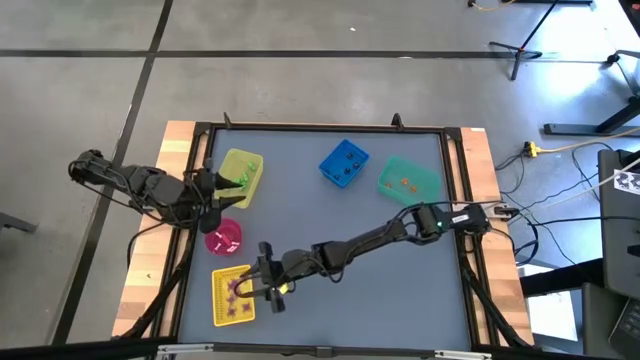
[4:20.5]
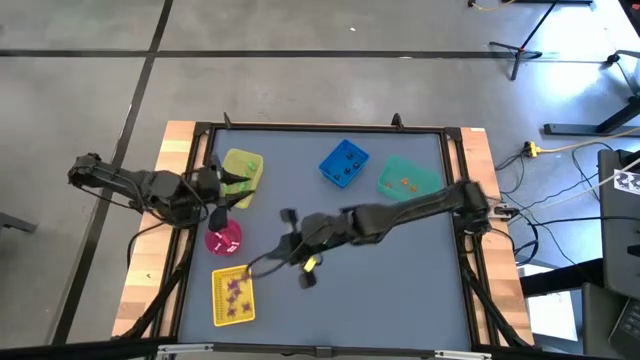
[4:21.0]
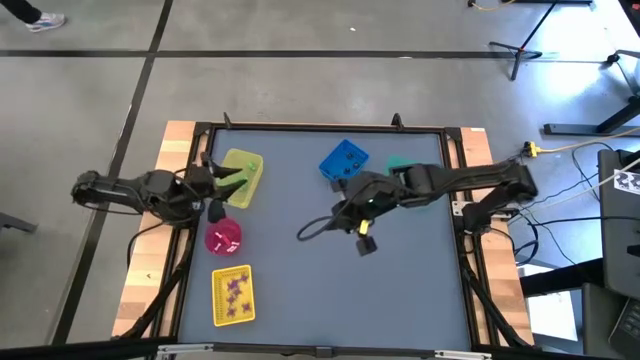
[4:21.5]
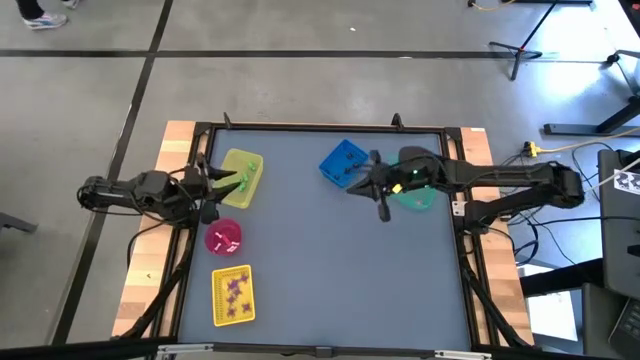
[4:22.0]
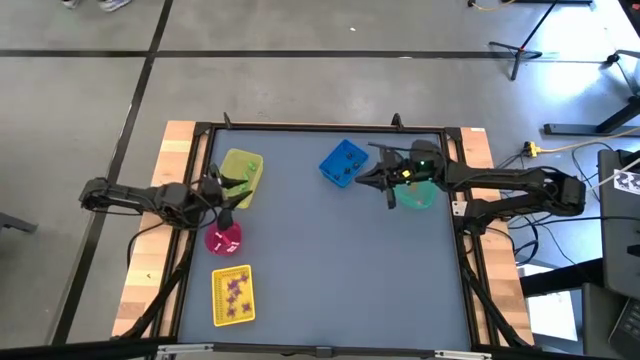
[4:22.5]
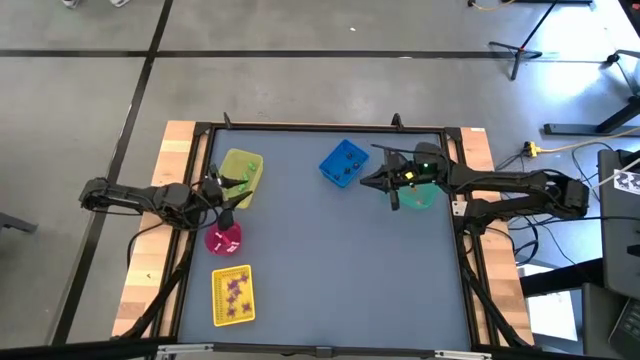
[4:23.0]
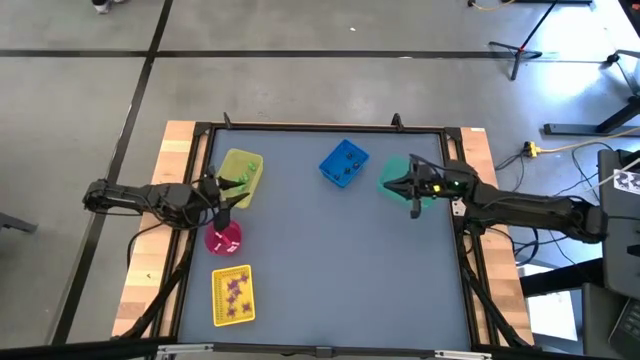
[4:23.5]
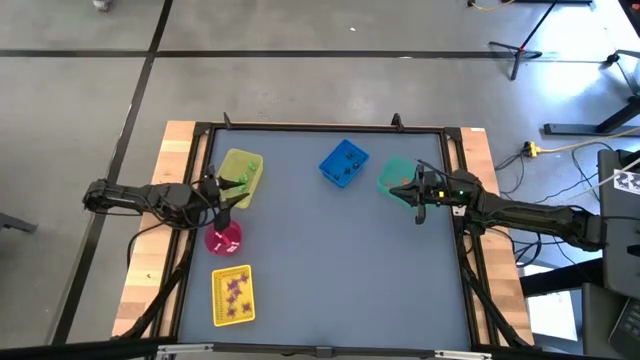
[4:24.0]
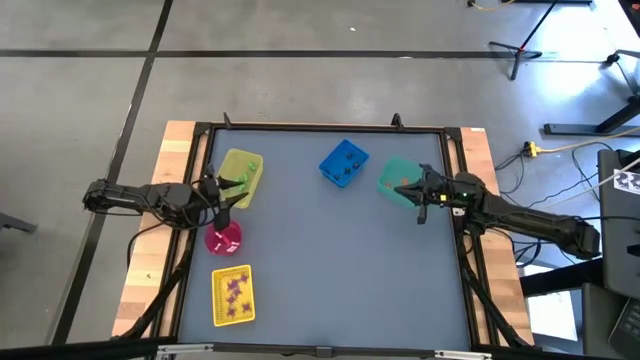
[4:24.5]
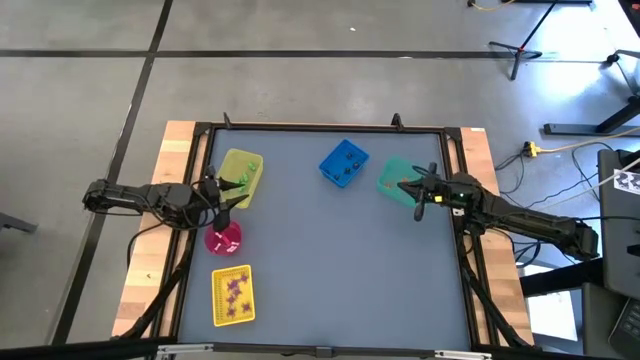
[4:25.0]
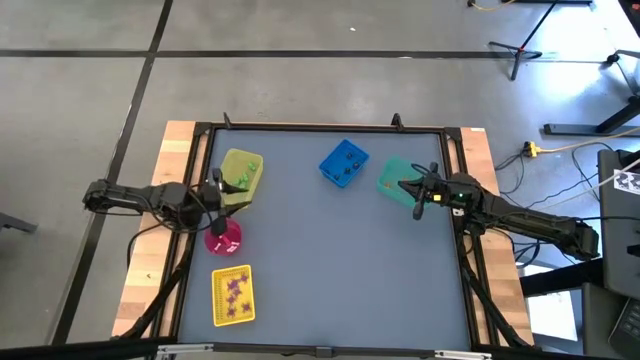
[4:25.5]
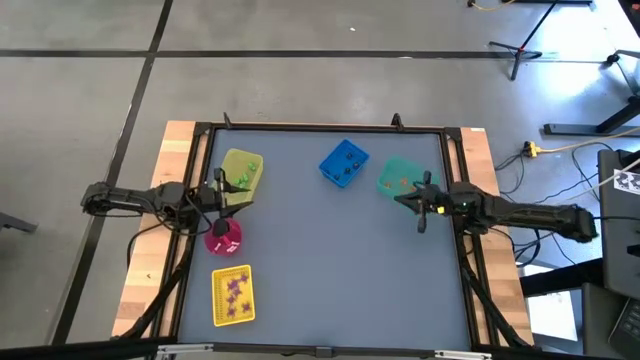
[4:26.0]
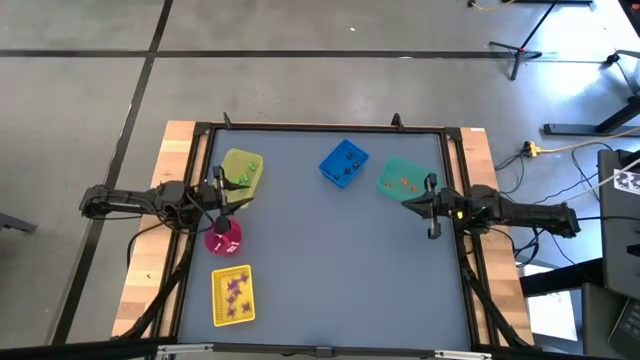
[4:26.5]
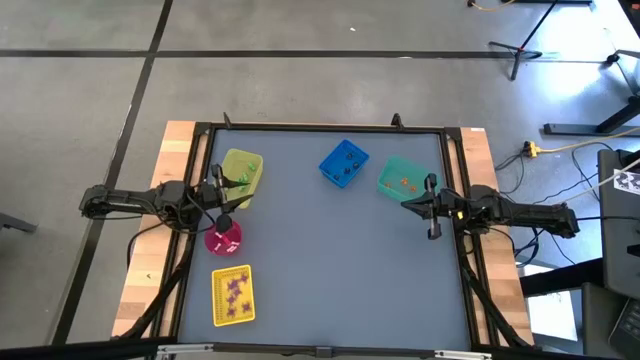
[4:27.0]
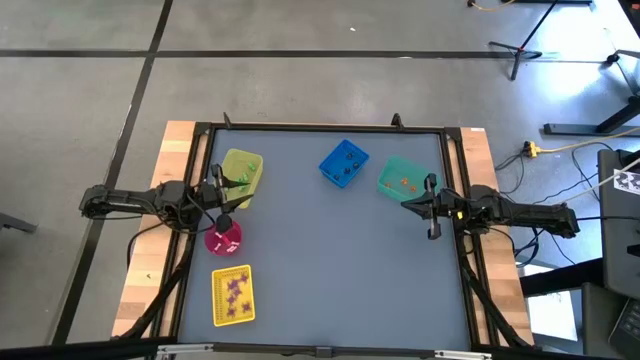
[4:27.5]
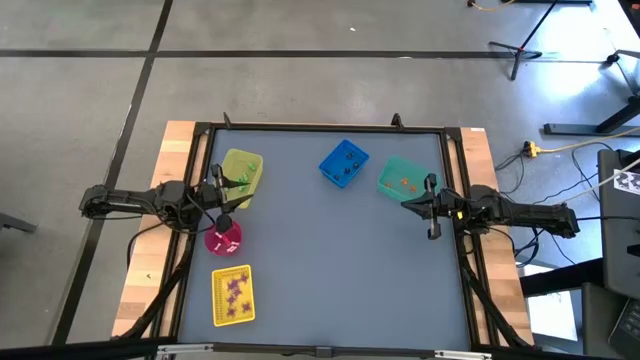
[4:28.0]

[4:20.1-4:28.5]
Task: Sort Halloween decoration
Return to Home Position

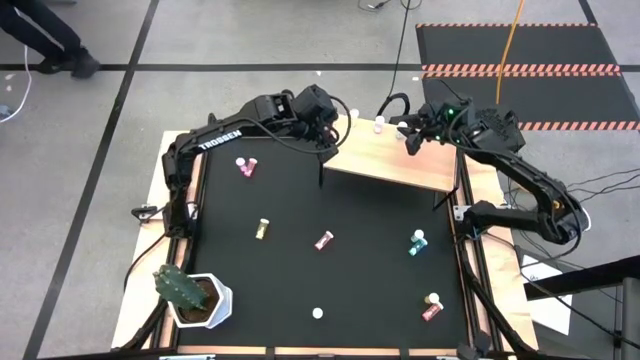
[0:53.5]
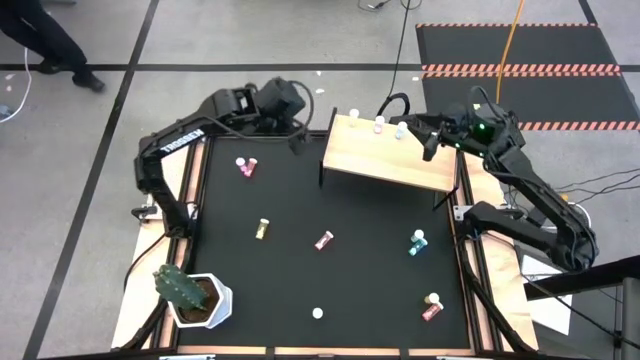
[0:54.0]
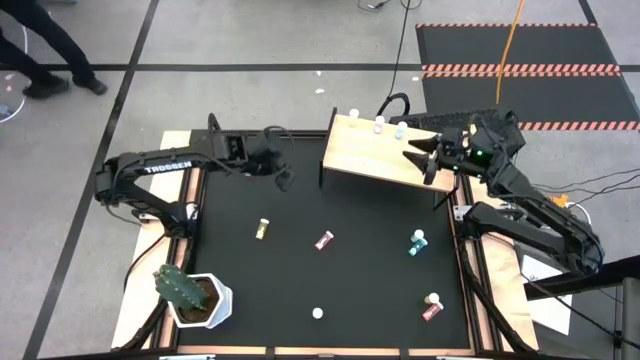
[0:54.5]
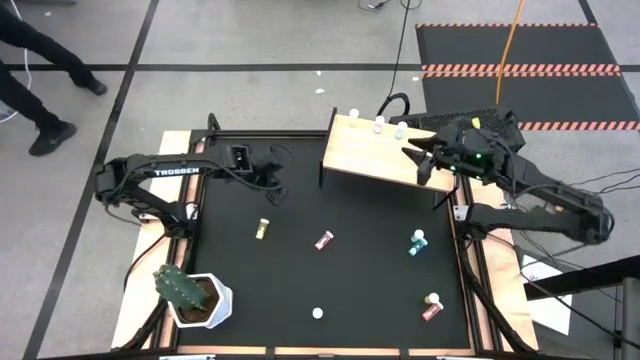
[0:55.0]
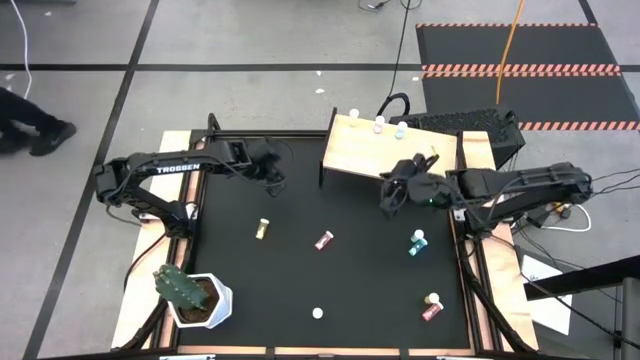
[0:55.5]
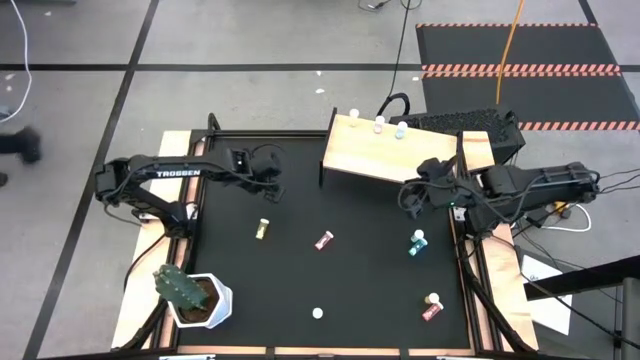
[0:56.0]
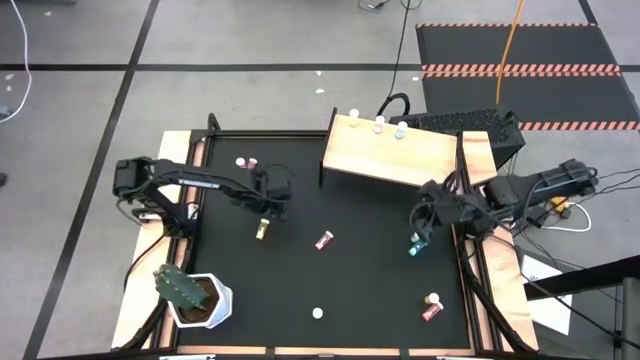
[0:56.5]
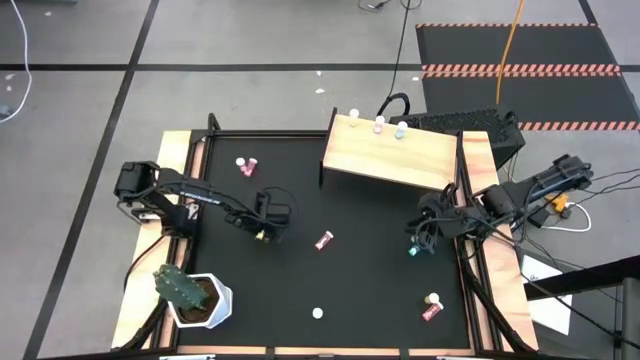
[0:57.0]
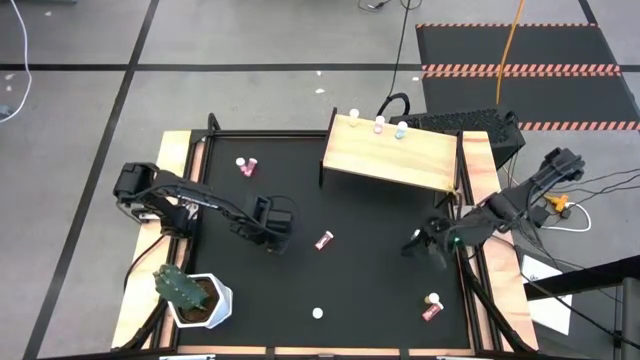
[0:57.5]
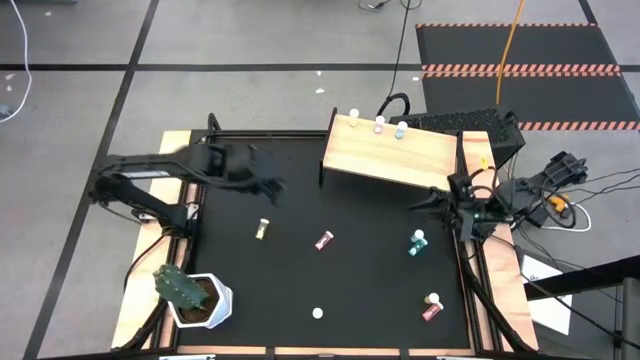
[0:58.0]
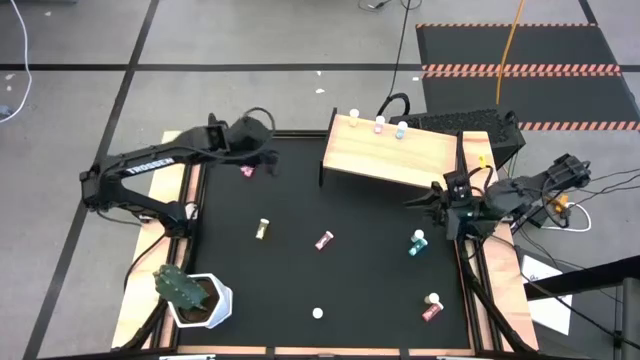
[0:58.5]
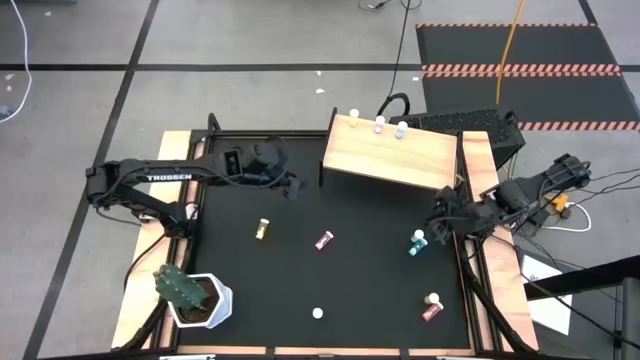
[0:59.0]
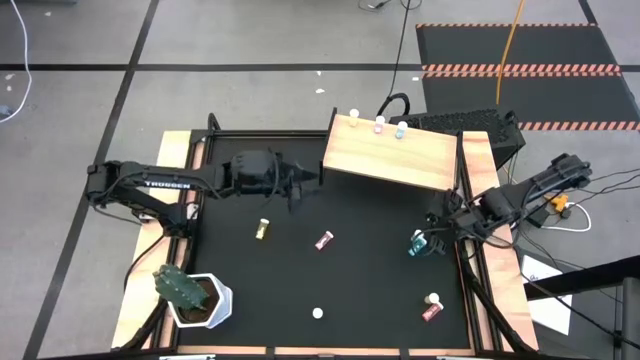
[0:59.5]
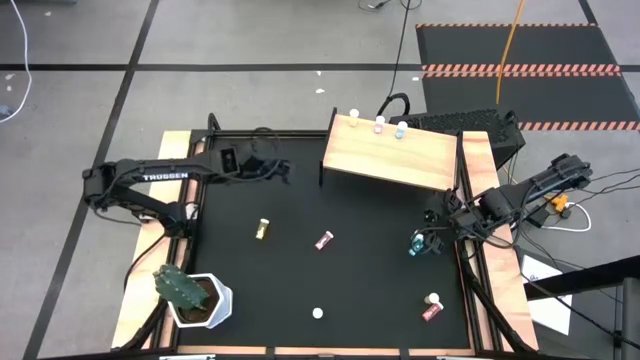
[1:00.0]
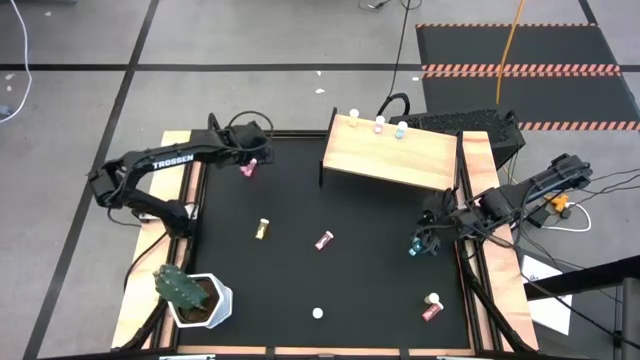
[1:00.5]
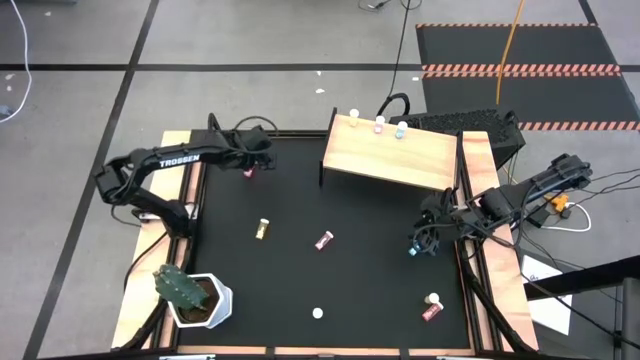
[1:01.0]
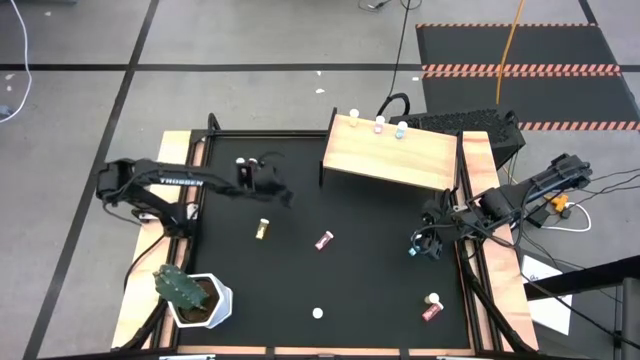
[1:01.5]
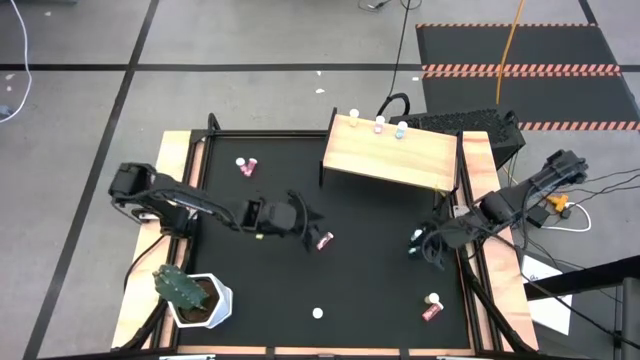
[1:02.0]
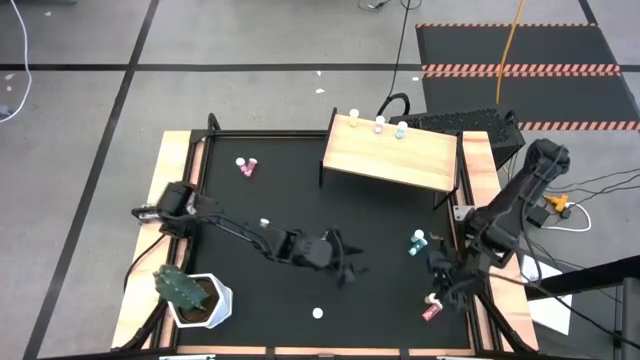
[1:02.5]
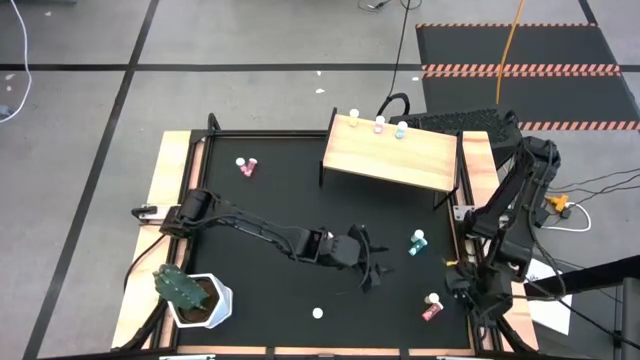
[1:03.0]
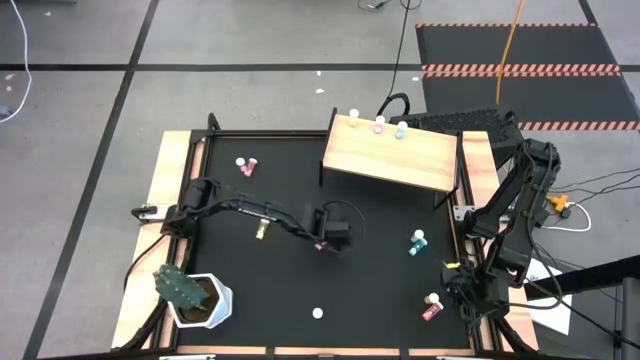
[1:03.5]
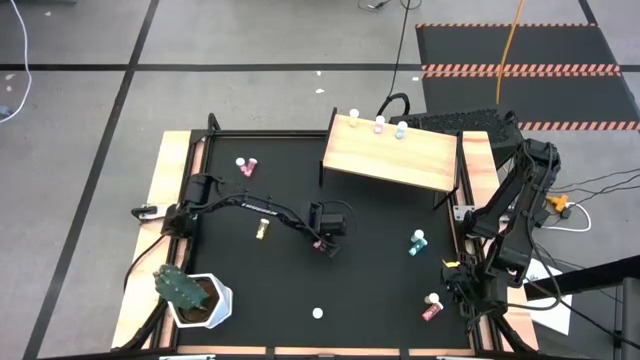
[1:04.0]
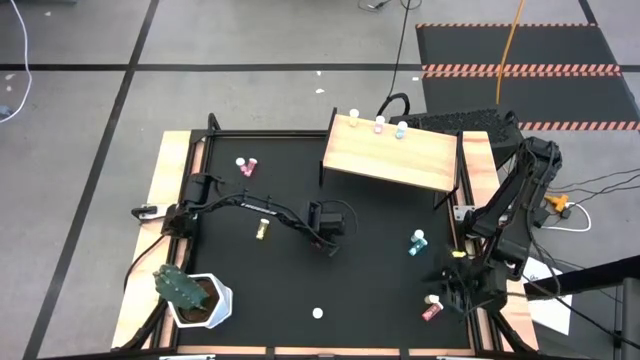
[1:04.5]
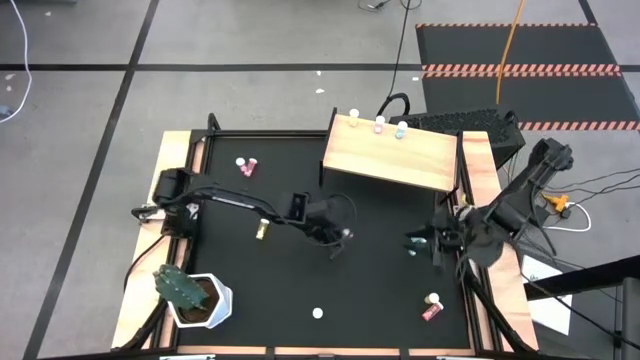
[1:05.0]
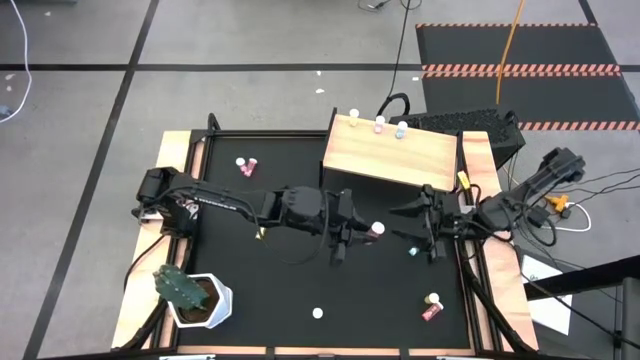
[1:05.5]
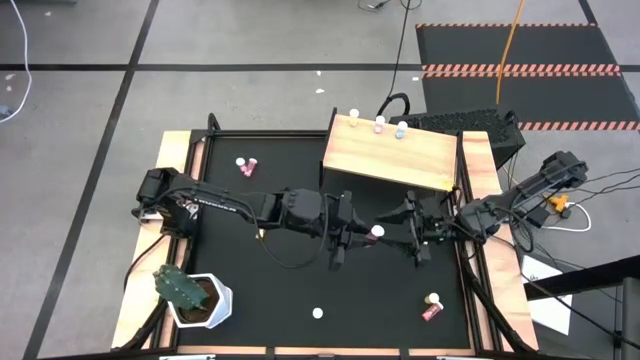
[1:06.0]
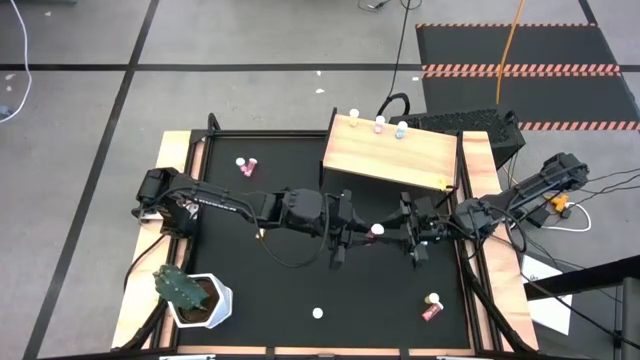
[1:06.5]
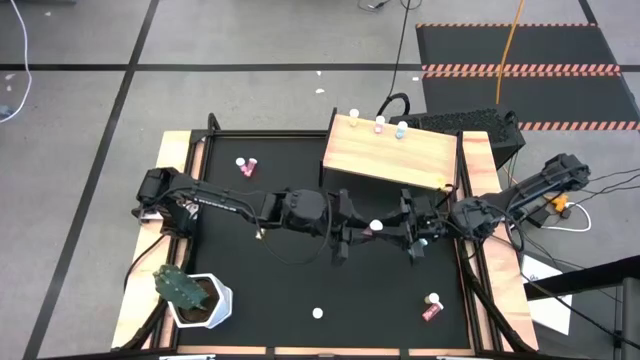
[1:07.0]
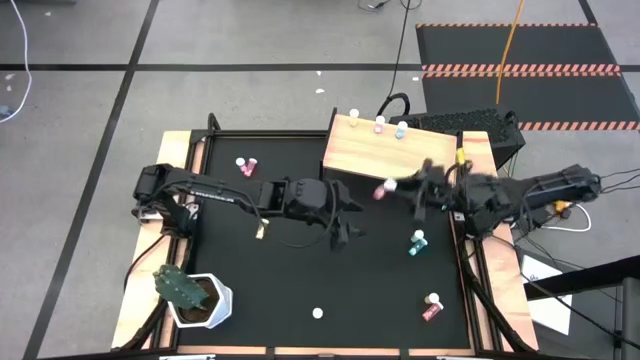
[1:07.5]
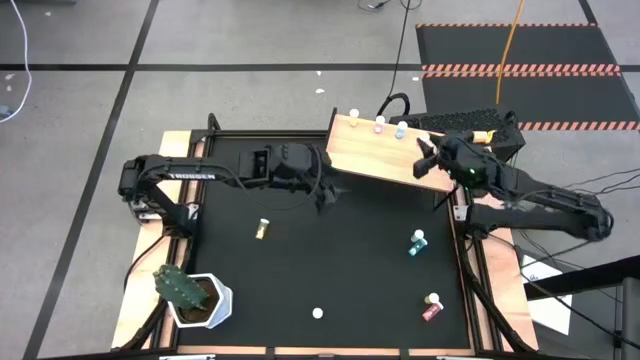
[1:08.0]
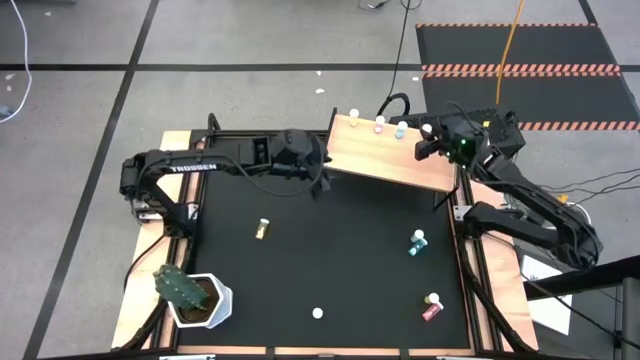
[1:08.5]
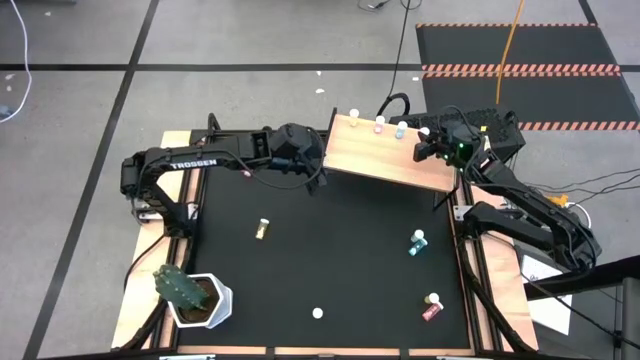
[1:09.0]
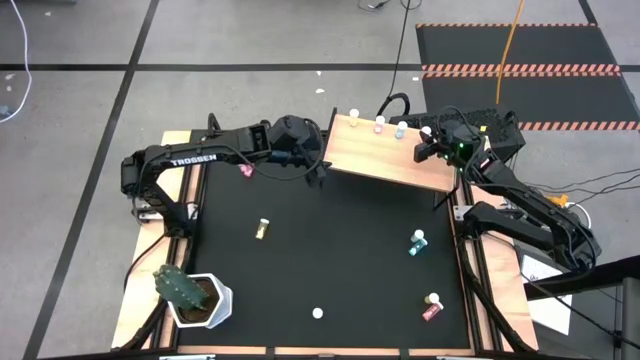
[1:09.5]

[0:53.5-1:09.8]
Task: Pick and place medicine bottles onto shelf by color
Put the center orange pill bottle on the shelf
